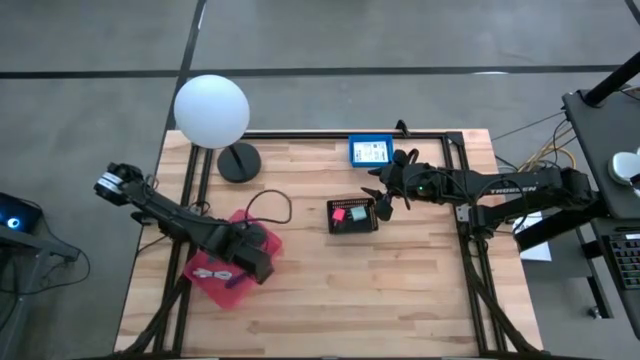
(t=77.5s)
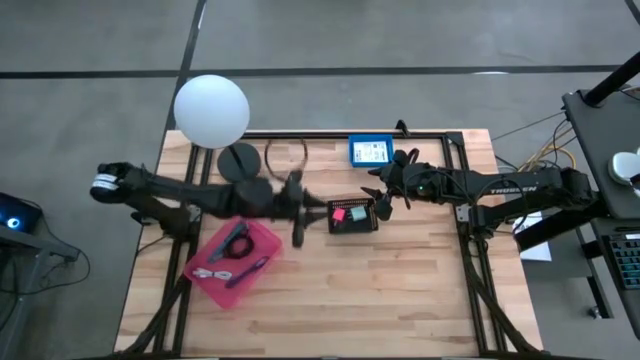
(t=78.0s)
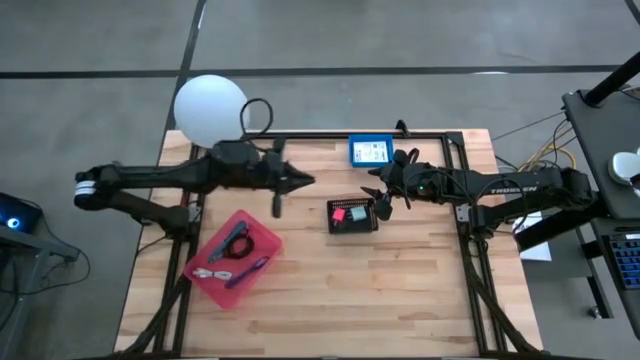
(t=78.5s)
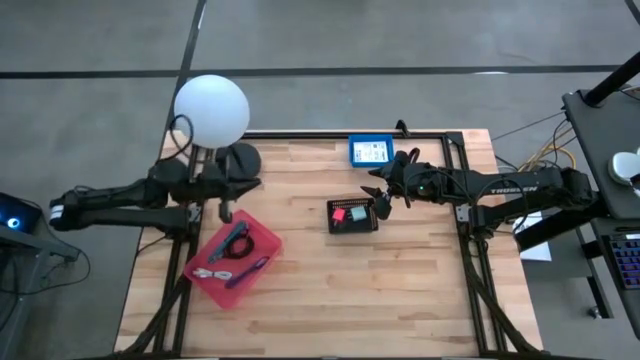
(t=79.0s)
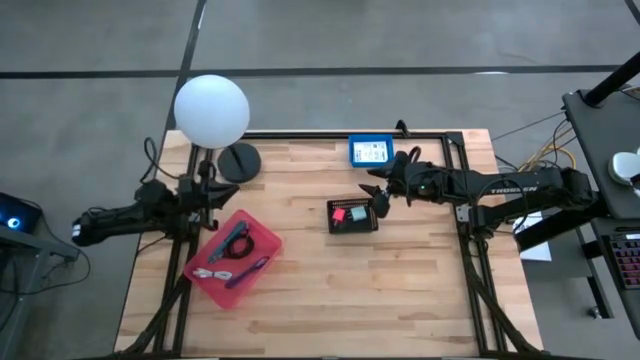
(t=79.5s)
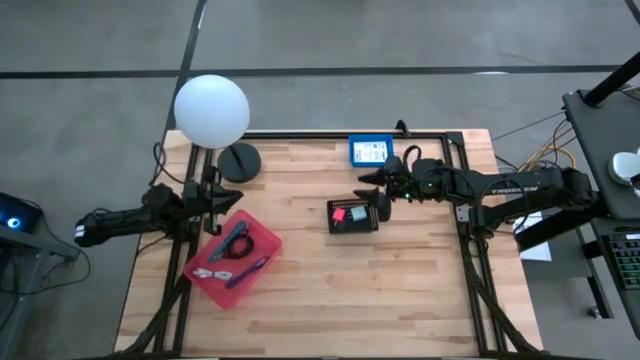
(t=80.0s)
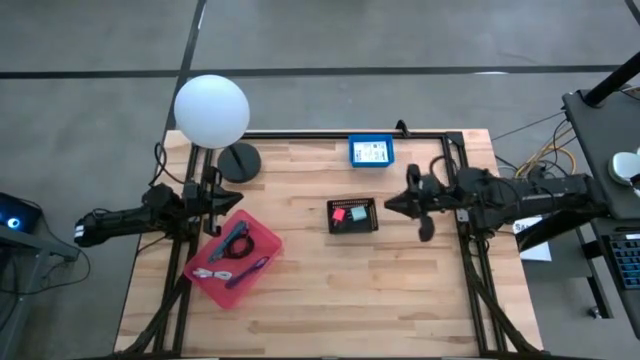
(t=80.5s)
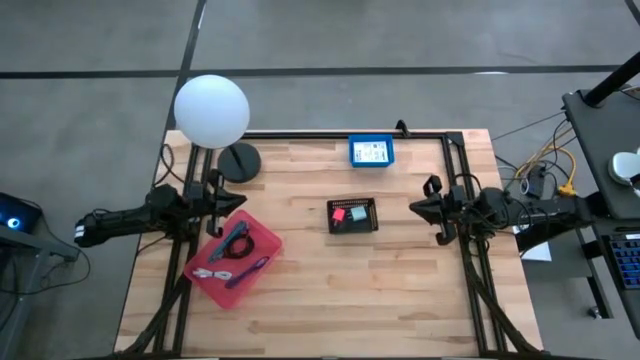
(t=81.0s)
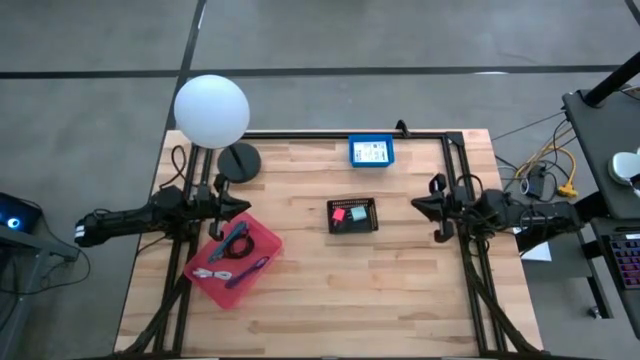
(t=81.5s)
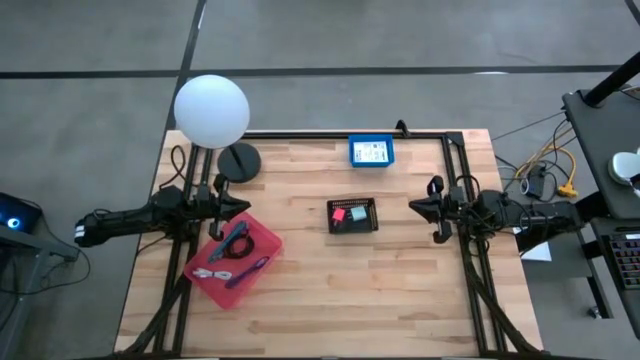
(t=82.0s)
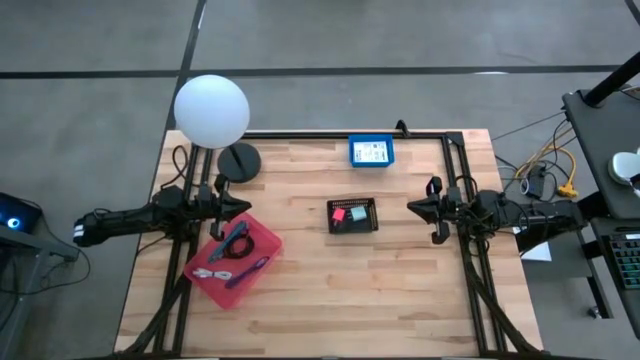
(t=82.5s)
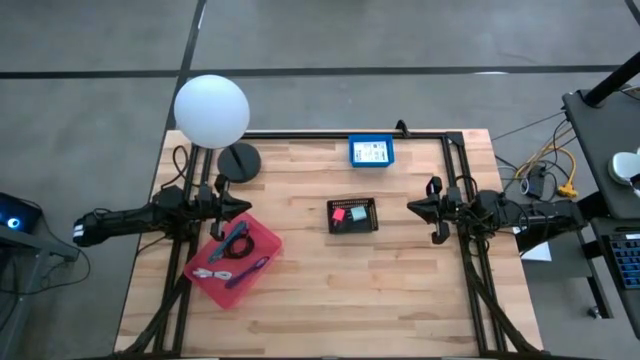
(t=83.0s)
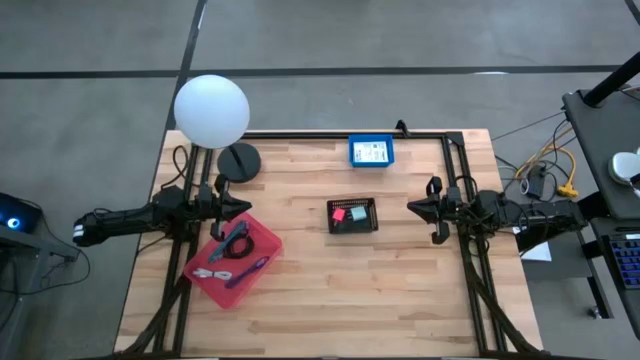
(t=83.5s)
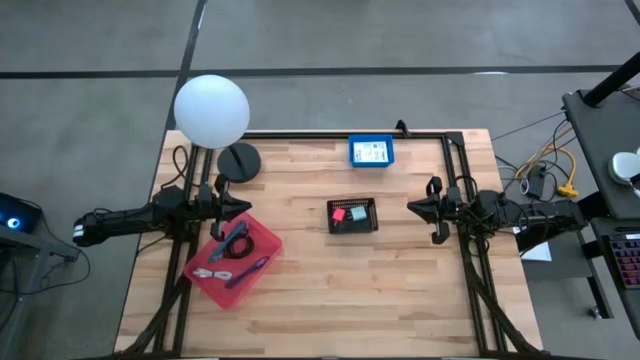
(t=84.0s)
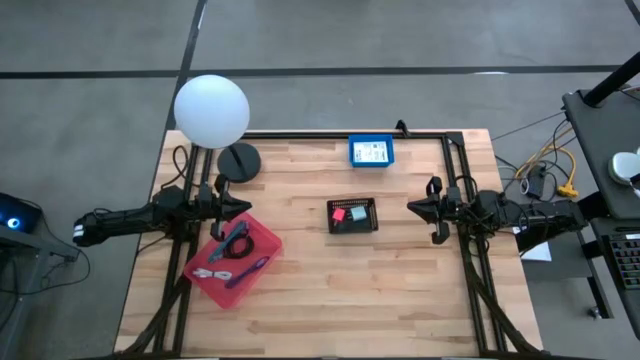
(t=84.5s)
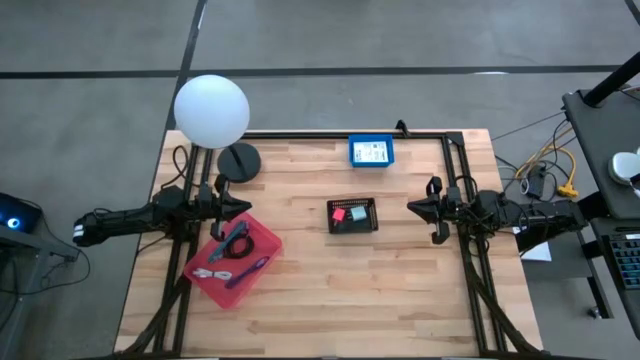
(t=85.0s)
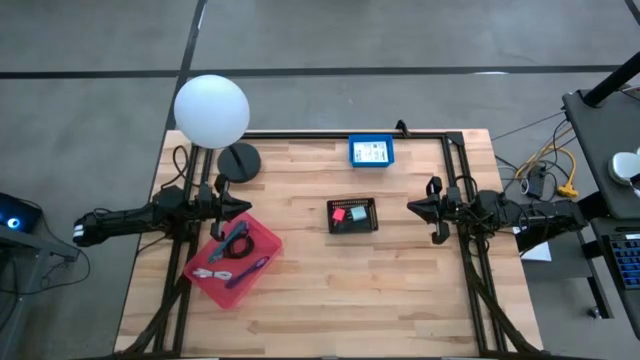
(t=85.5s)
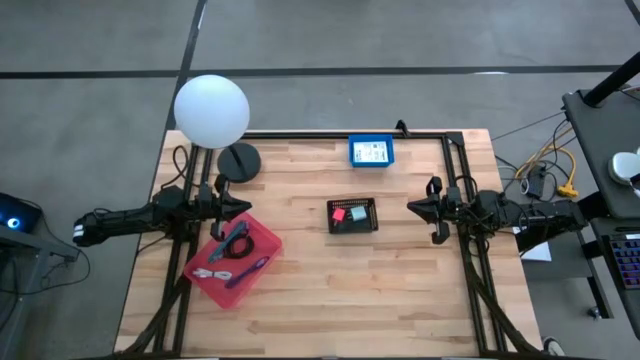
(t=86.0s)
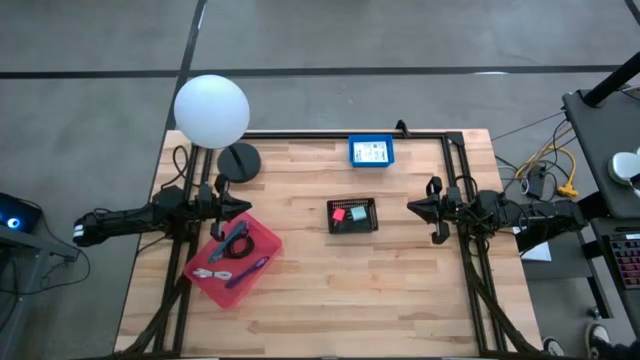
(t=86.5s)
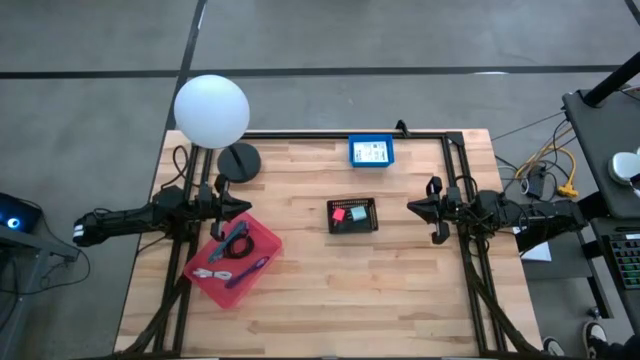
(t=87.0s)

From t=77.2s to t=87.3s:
Task: Pick and place items into bin
Return to Home Position

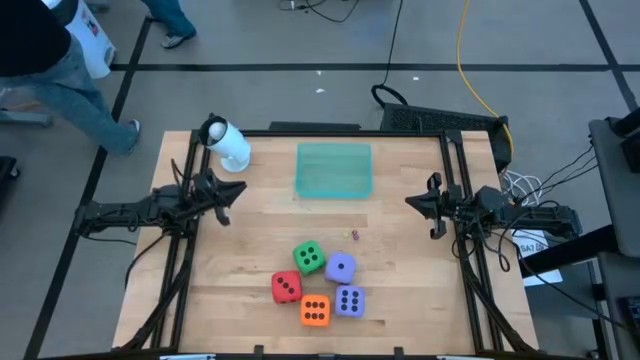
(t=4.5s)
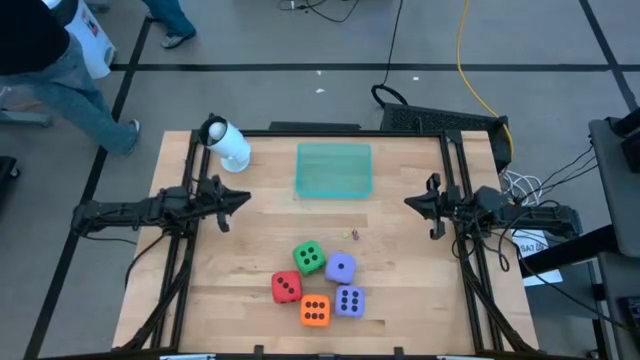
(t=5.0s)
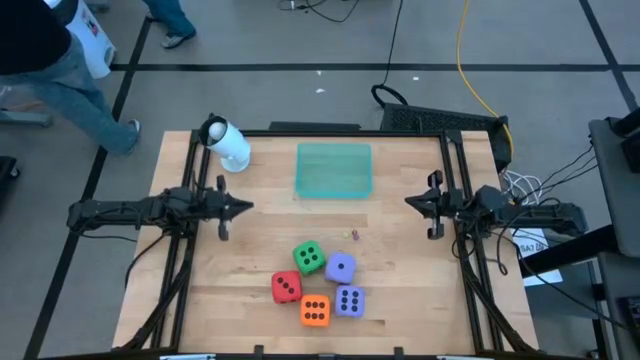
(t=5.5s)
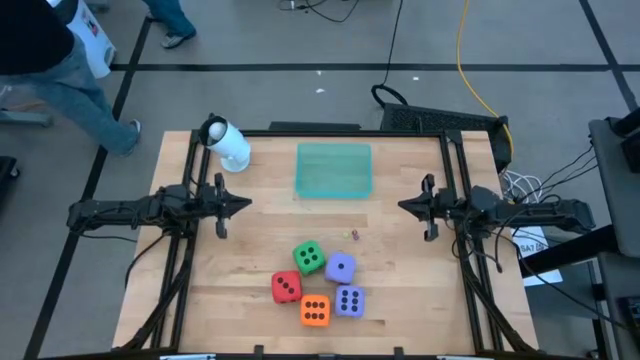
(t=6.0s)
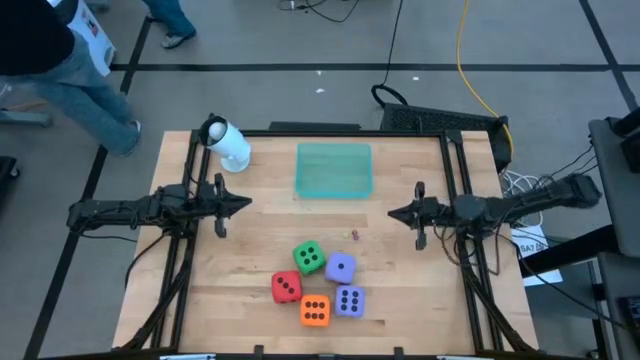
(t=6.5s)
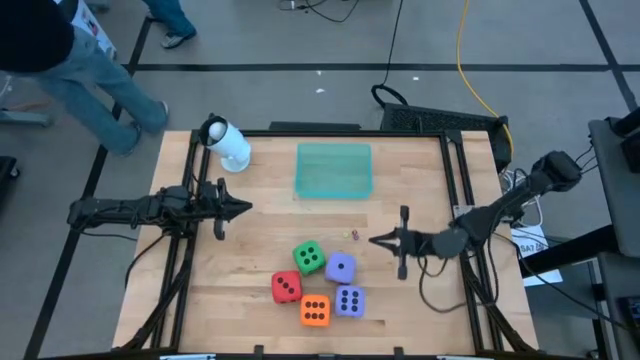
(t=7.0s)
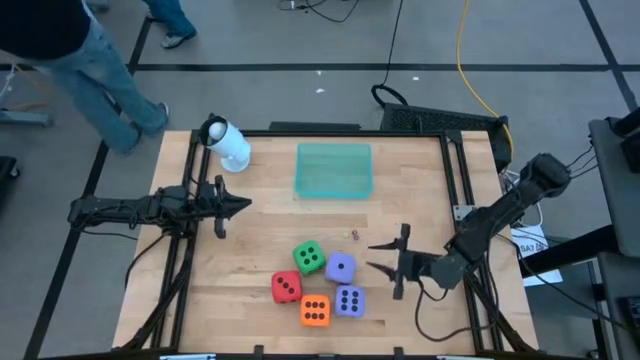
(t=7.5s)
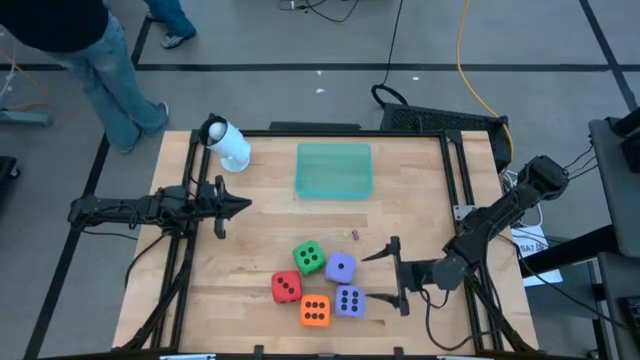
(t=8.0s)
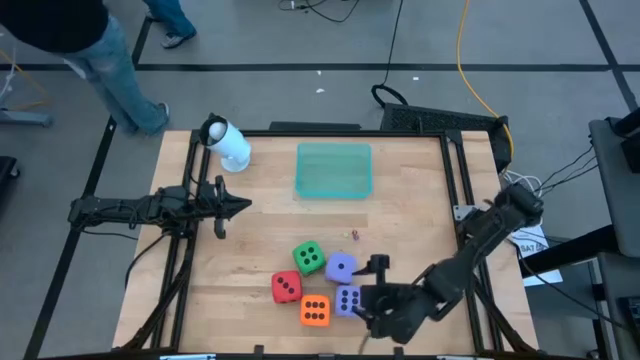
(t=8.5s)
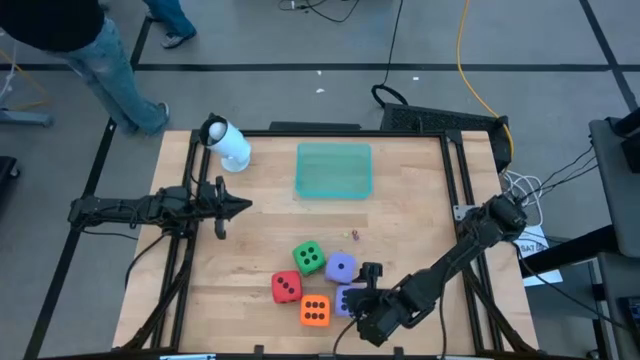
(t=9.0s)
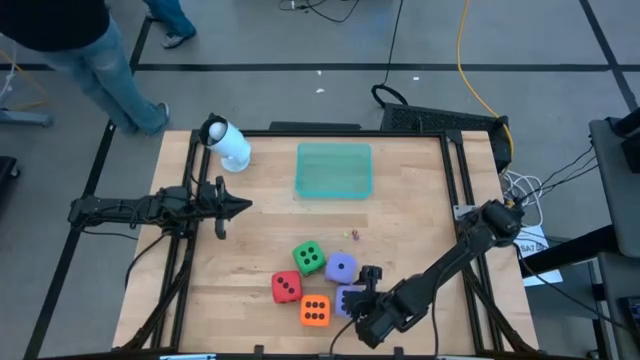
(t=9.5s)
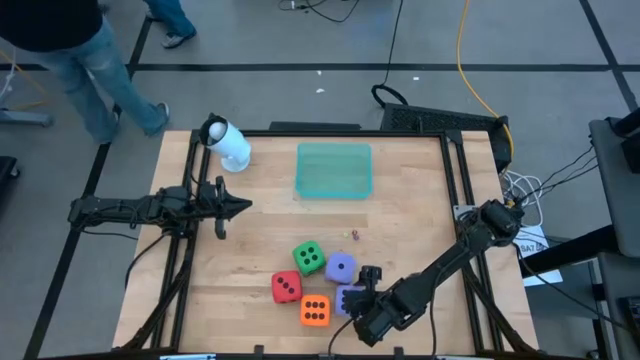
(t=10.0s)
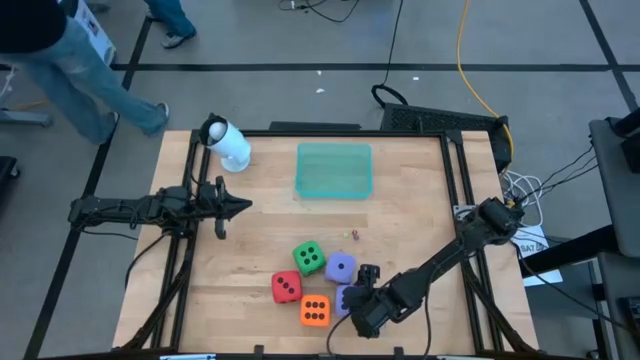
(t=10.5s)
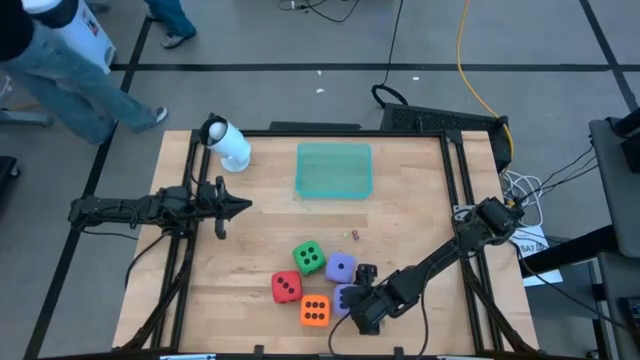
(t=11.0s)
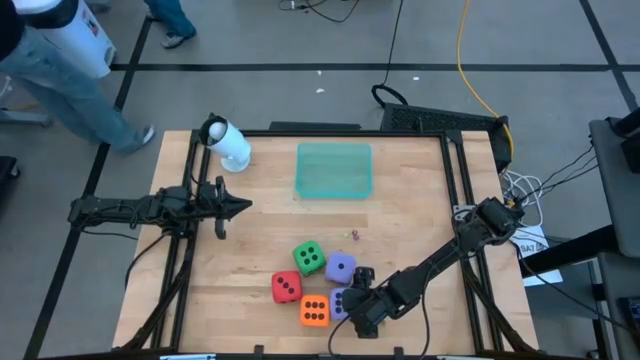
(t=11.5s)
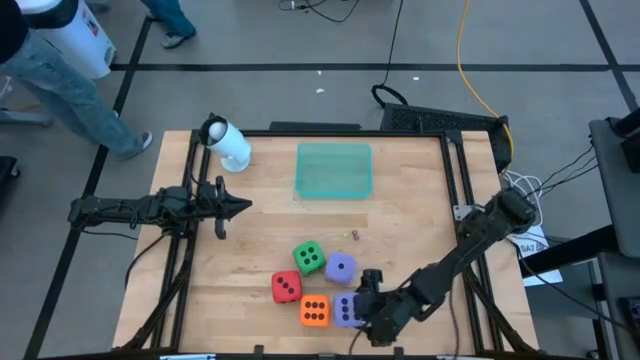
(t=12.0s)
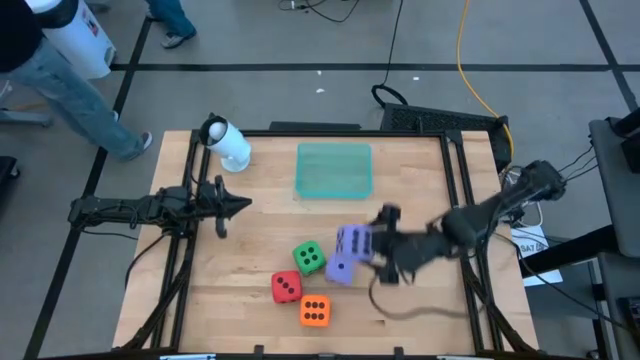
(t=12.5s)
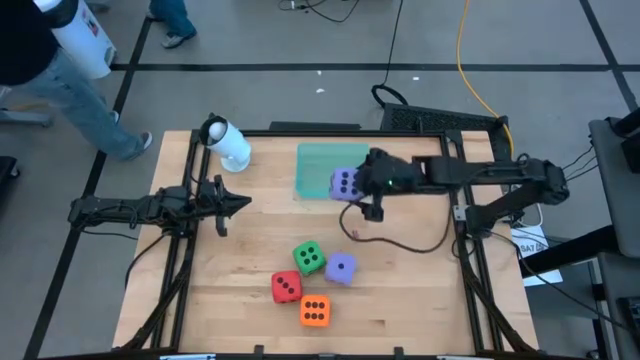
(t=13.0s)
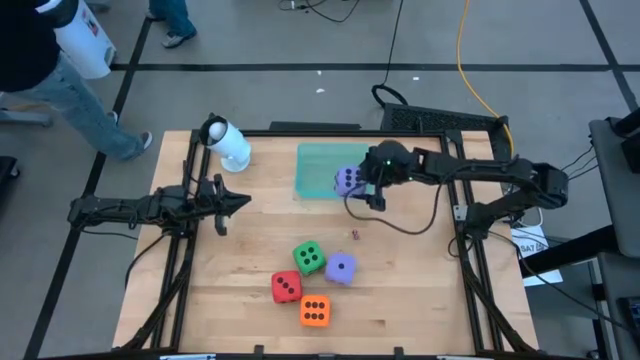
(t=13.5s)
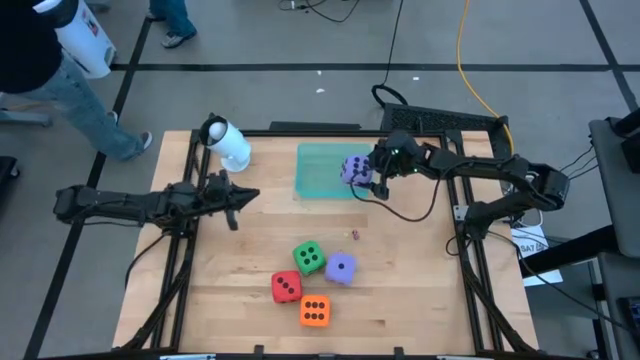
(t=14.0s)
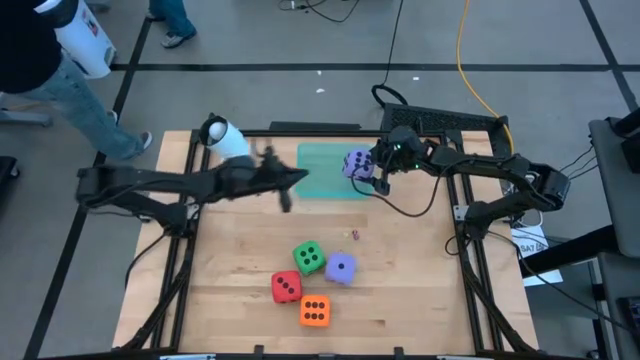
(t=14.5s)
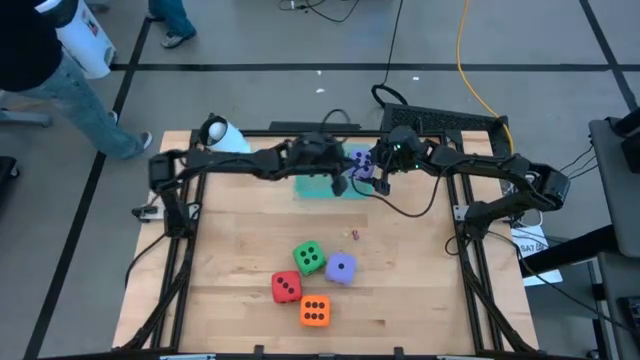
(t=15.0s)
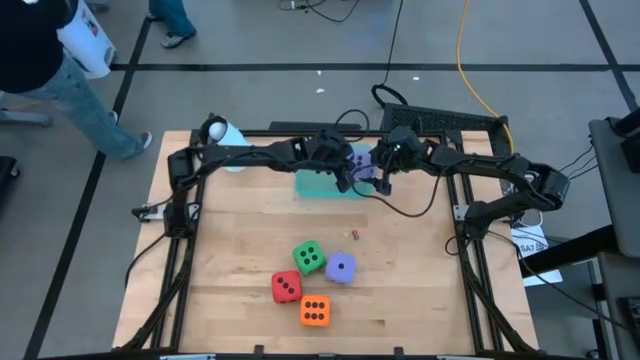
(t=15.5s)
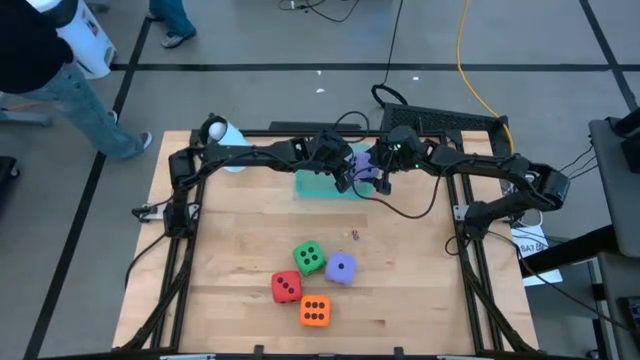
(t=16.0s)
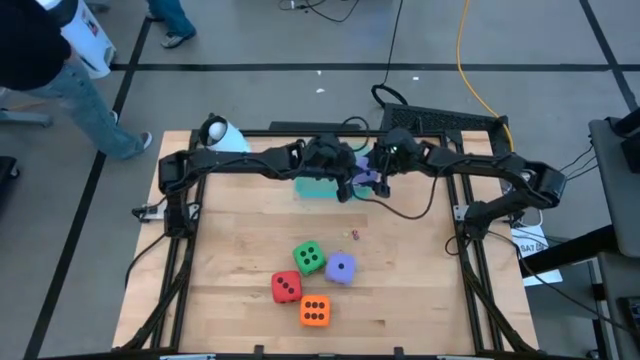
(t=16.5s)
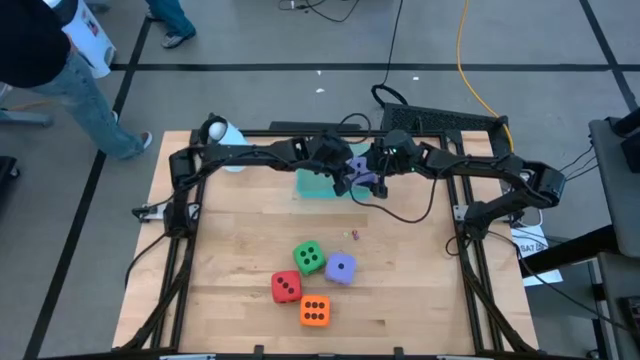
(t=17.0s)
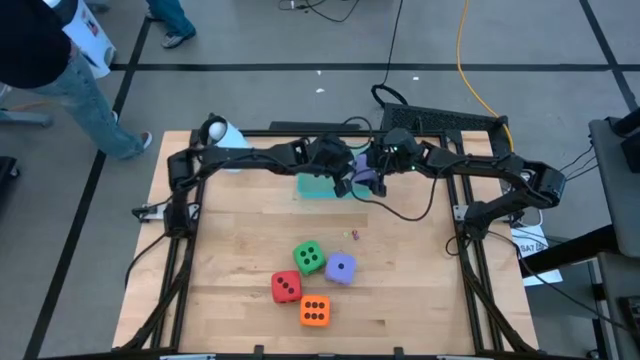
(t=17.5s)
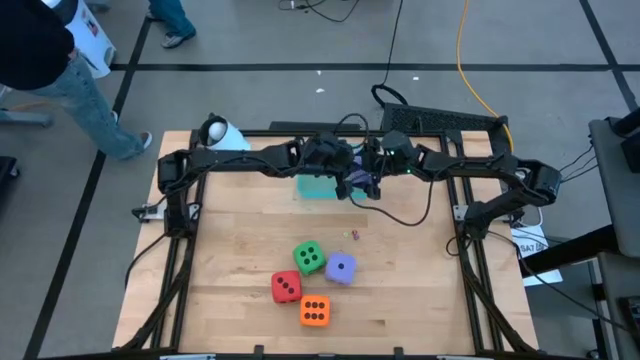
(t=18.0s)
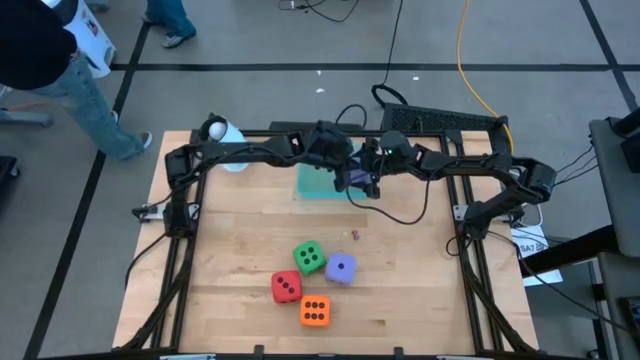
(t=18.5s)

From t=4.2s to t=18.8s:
Task: Pick & Place Dice
Put the bottom big purple dice into the green bin
